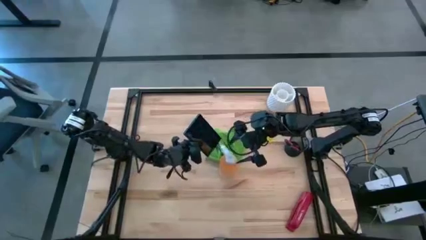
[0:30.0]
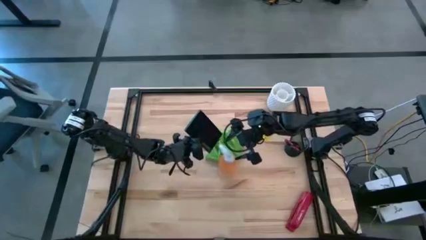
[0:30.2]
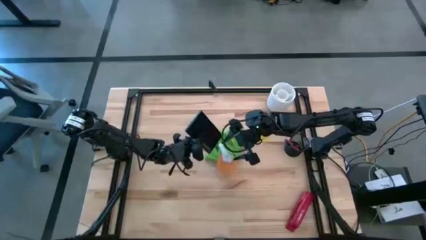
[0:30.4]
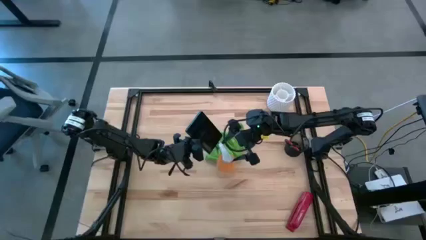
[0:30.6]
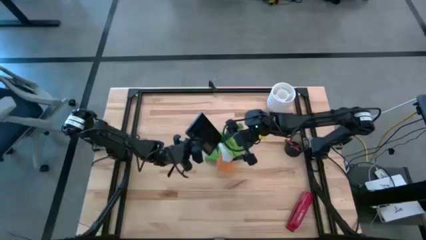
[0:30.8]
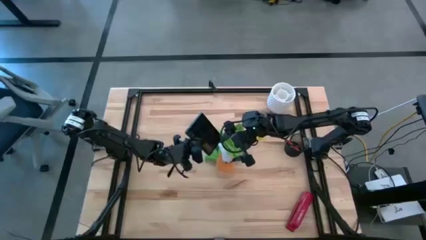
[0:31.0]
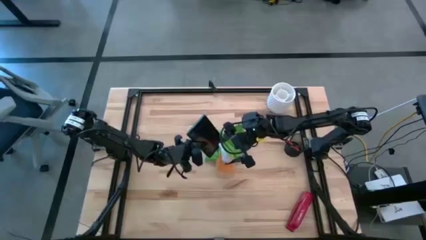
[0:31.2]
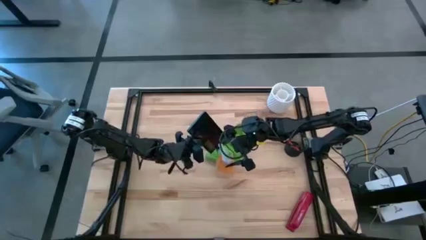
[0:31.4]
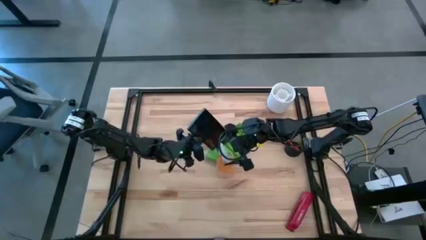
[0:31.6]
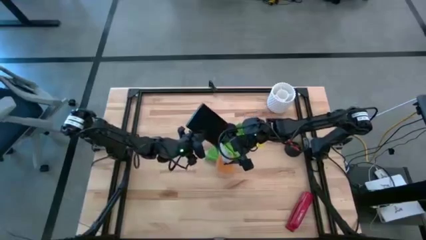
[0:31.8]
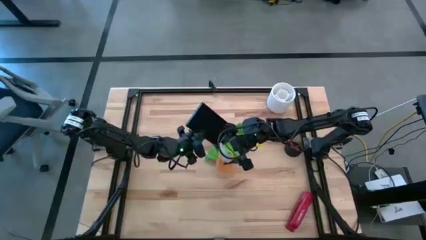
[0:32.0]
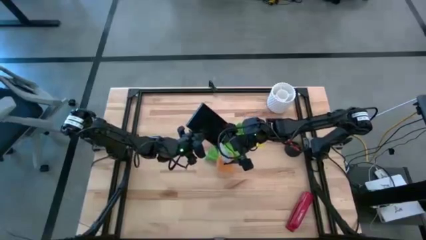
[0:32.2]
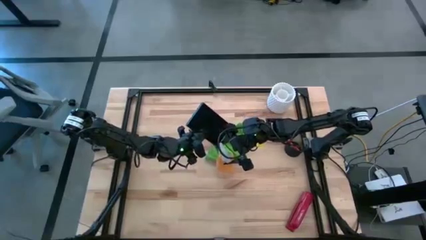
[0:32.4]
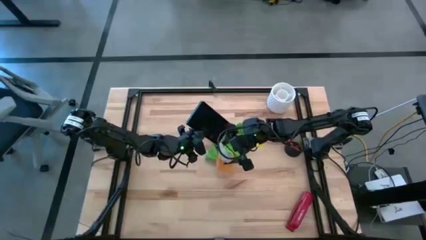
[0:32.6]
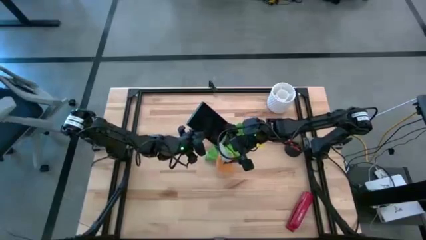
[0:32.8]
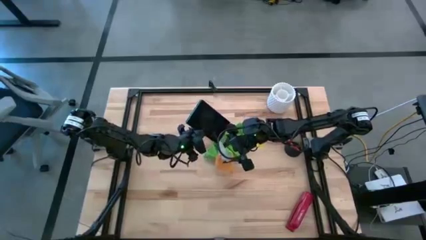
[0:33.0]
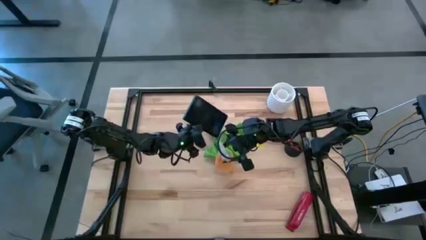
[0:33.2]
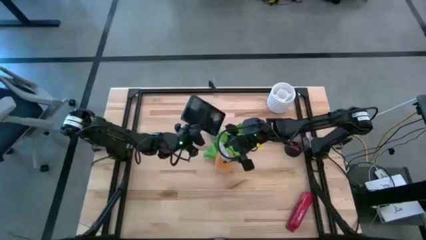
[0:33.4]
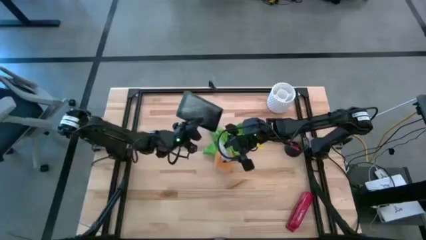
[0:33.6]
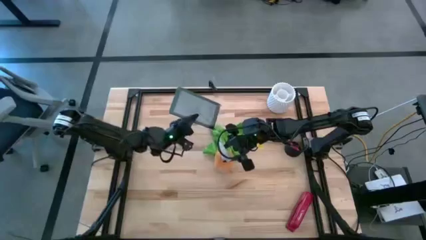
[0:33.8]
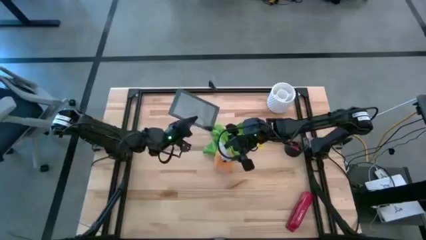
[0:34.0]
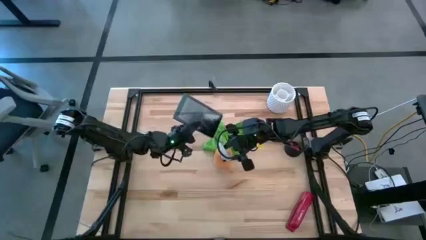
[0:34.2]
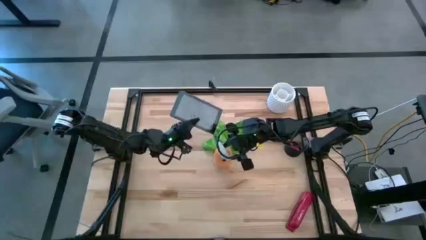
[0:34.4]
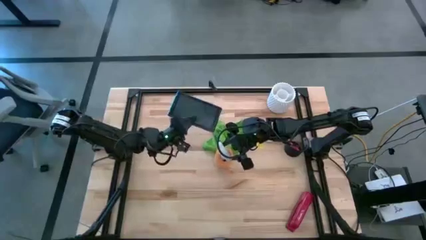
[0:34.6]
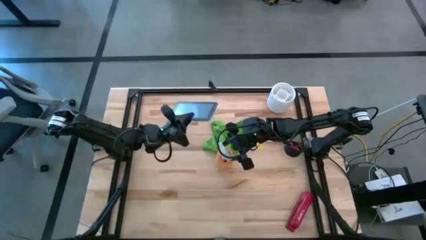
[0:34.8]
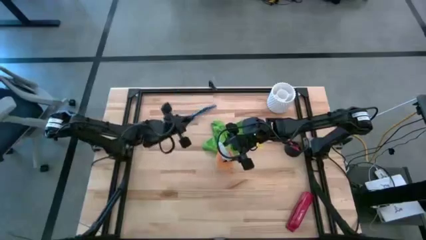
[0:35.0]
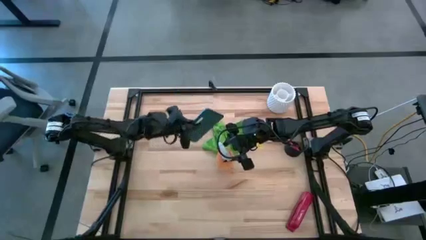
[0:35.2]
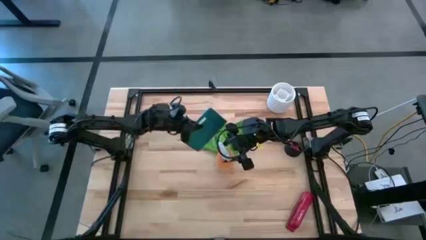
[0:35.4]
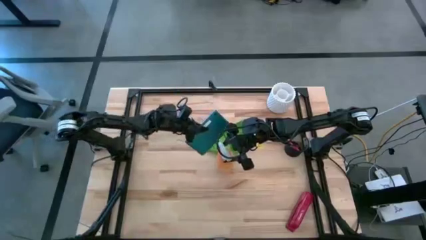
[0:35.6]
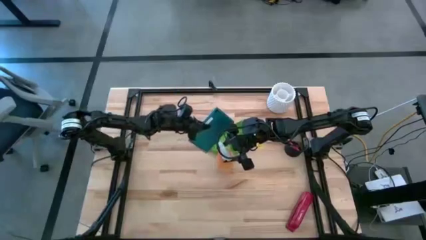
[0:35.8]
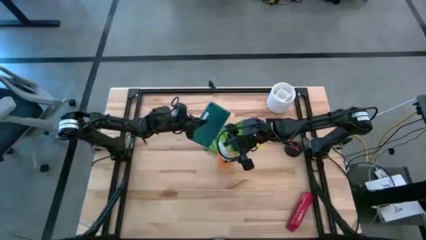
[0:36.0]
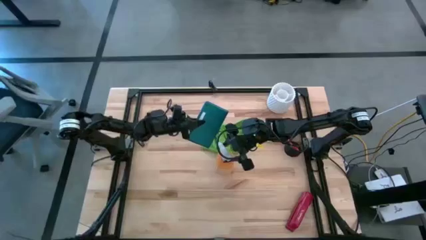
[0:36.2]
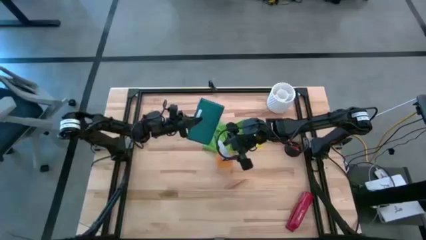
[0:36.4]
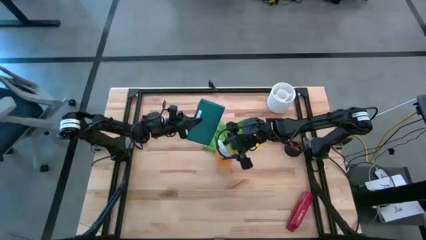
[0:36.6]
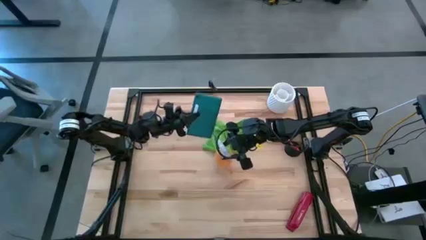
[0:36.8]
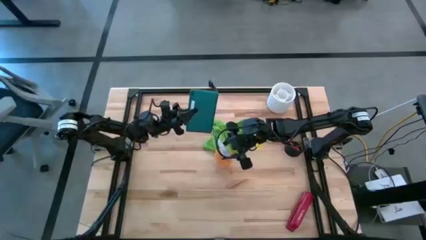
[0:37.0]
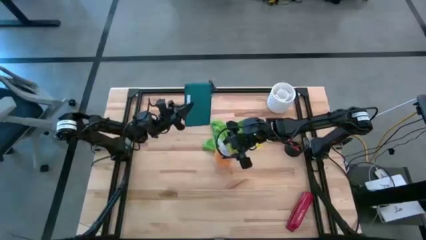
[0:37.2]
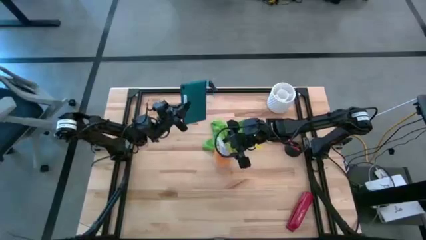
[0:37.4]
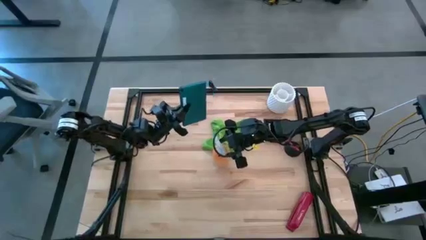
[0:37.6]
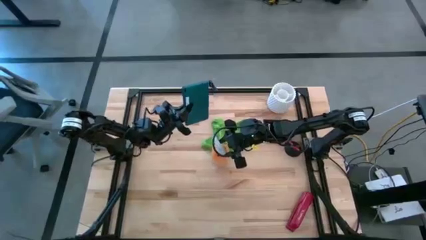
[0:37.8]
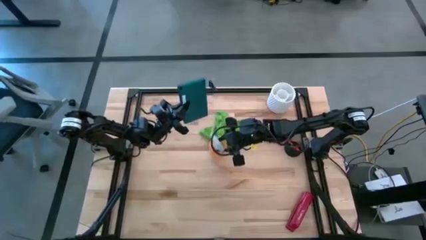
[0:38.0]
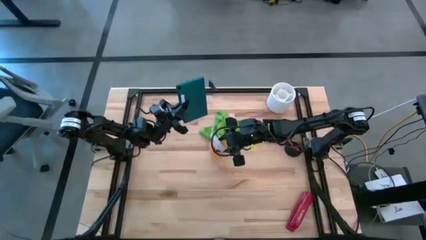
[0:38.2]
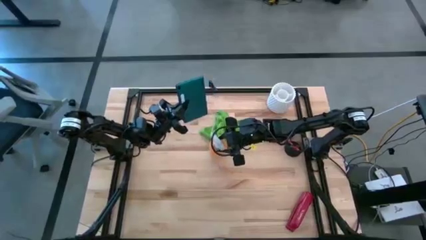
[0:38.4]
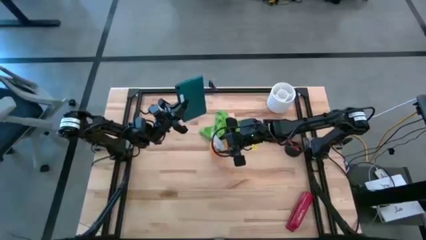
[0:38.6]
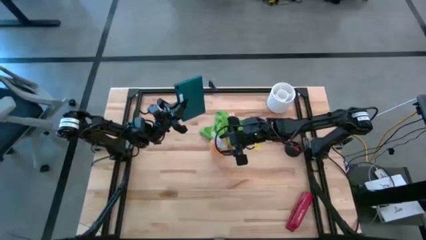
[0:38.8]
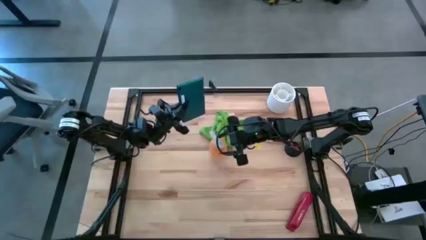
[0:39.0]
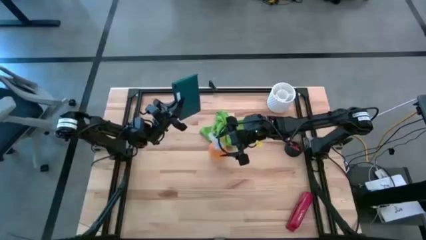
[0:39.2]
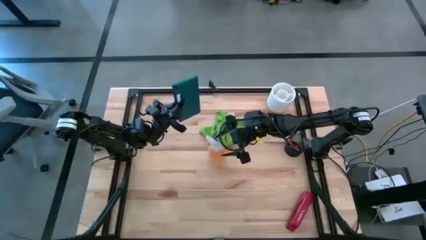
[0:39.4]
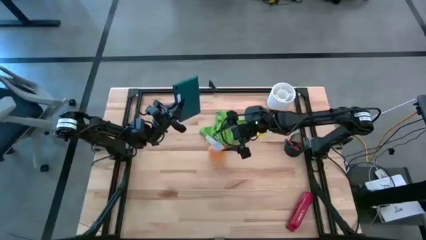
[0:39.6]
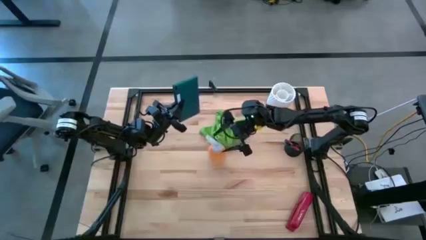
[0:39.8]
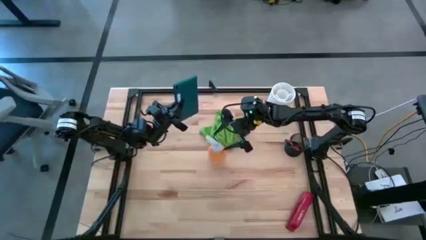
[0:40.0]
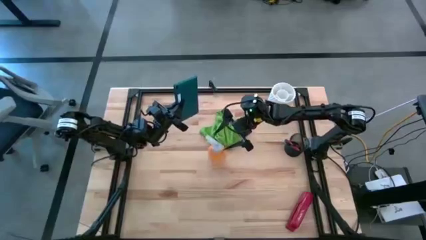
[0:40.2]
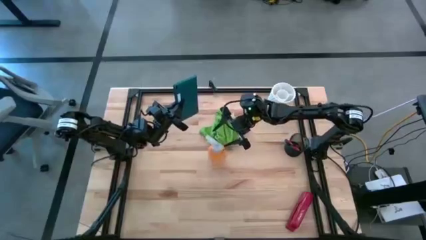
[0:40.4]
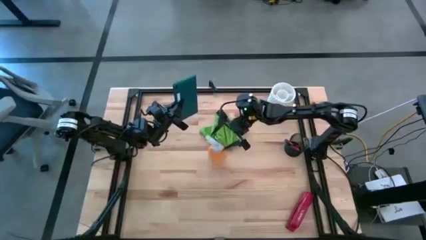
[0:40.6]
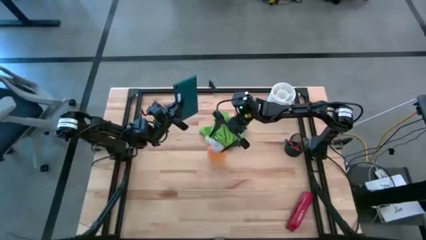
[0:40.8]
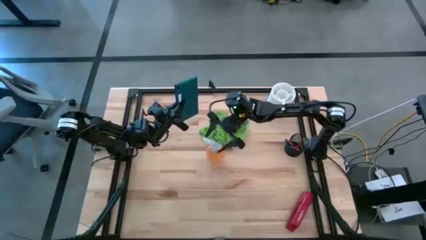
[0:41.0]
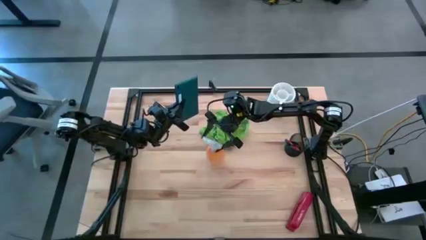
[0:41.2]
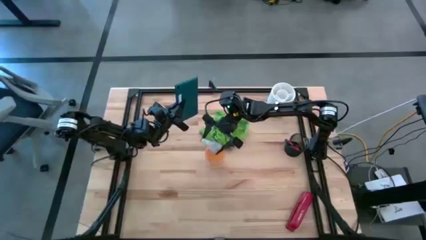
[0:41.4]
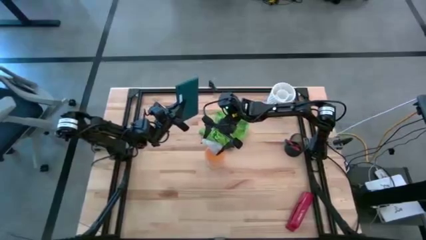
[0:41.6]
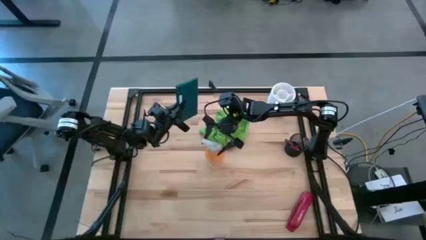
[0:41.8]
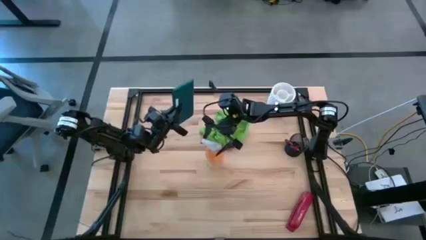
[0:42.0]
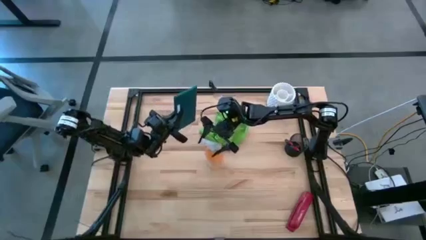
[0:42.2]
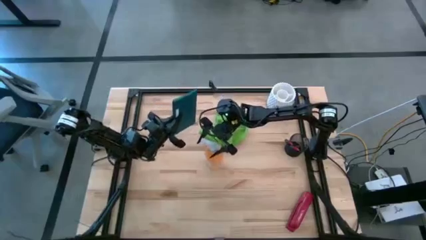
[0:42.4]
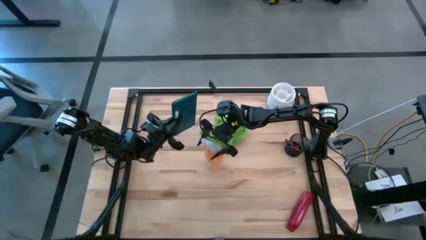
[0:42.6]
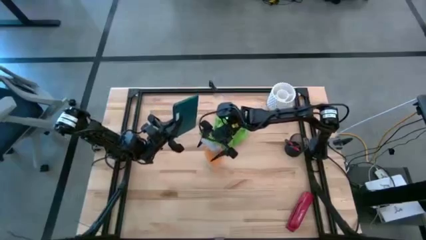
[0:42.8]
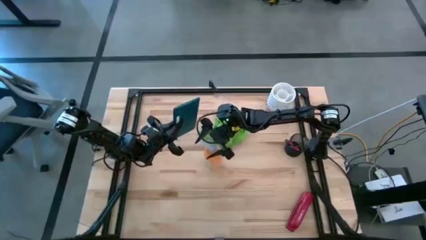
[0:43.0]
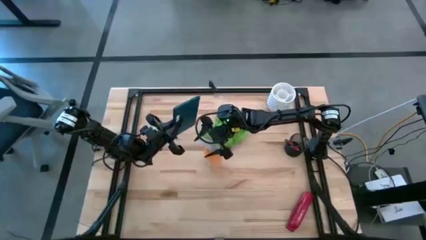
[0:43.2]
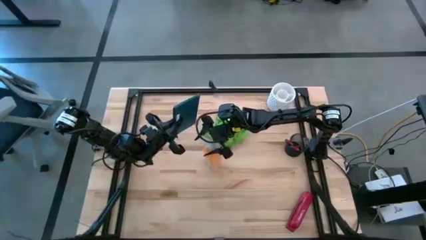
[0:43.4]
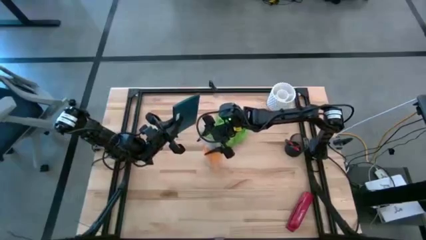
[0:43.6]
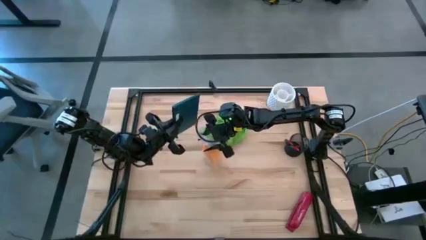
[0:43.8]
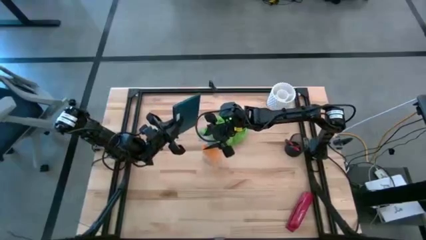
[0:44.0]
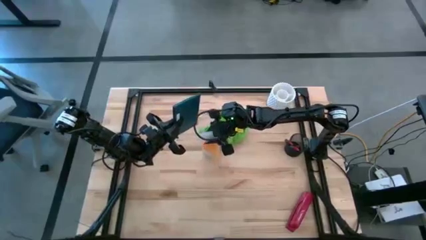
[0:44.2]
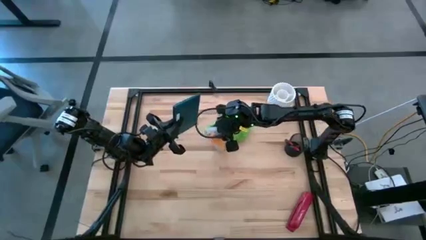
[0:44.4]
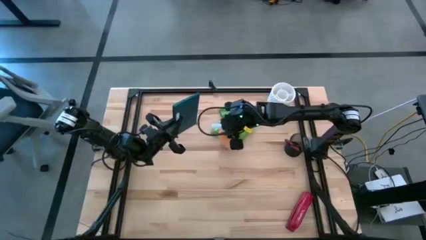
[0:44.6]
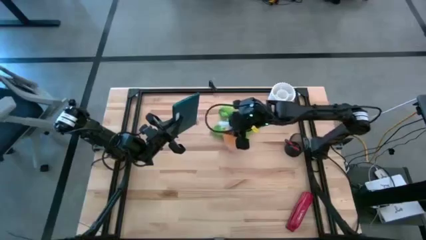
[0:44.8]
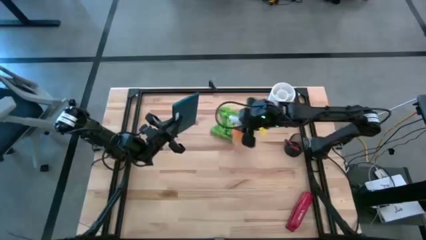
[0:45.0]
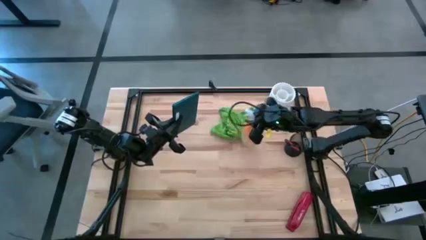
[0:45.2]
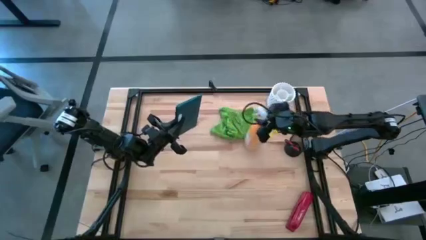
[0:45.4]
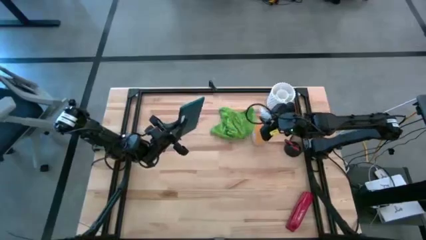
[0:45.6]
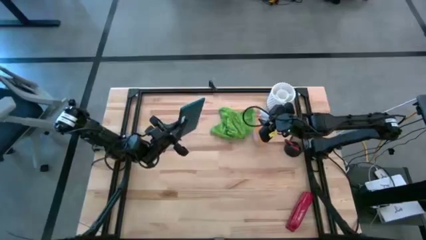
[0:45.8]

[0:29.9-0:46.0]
Task: Apply microfiber cloth
Spray the front and back of the tablet with the spray bottle
